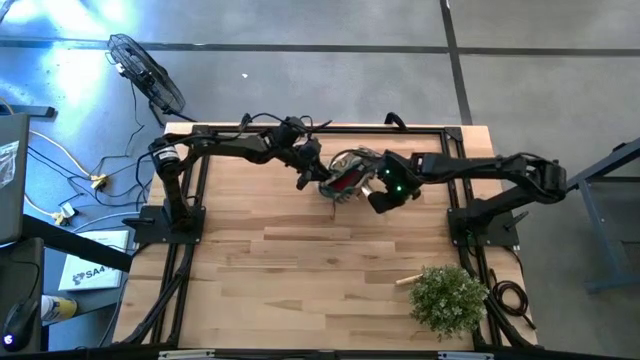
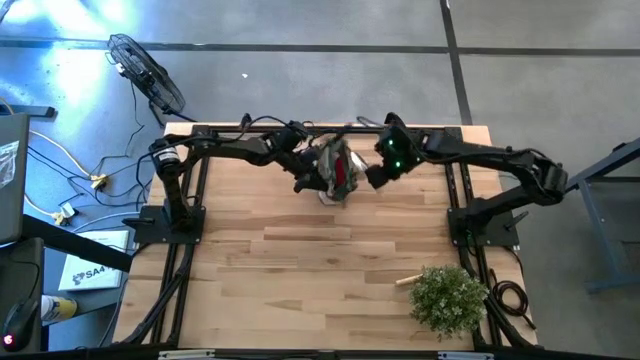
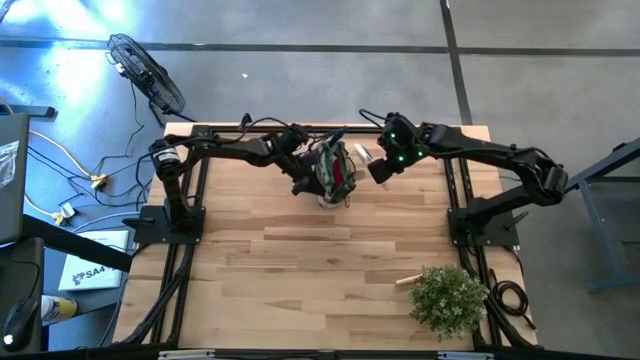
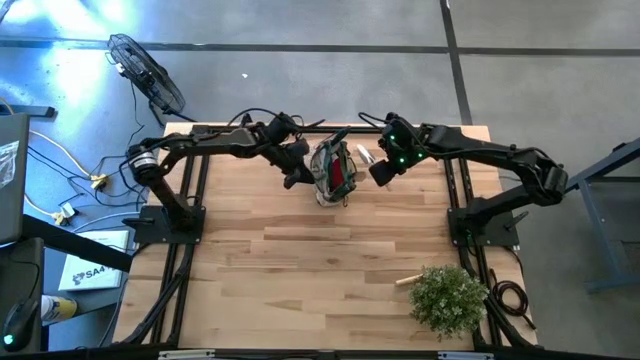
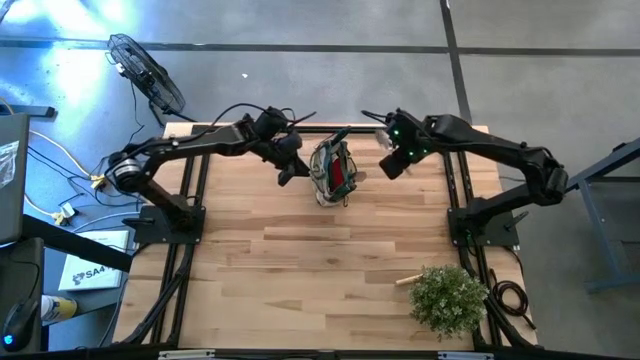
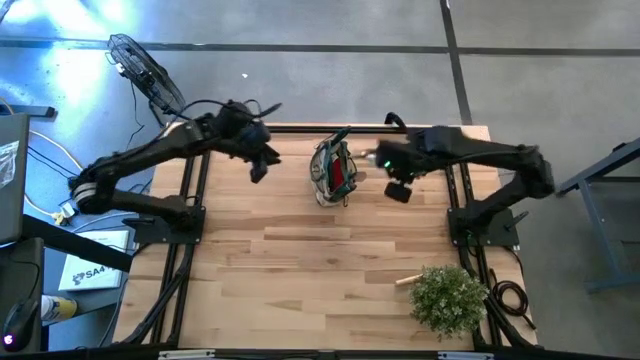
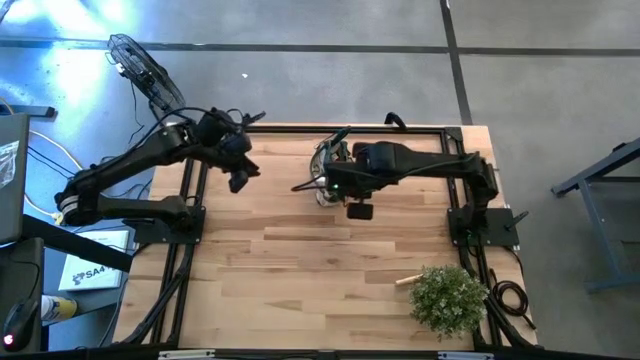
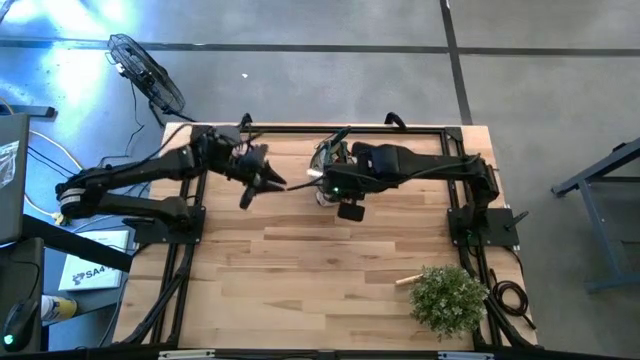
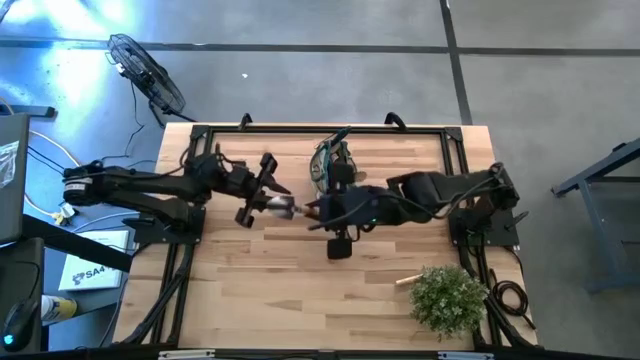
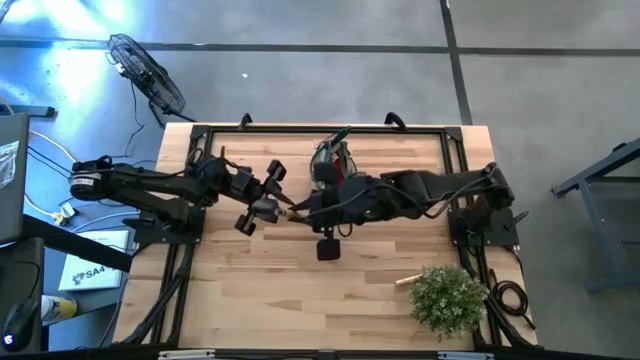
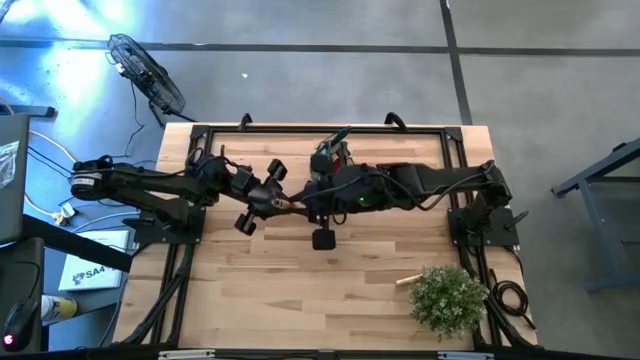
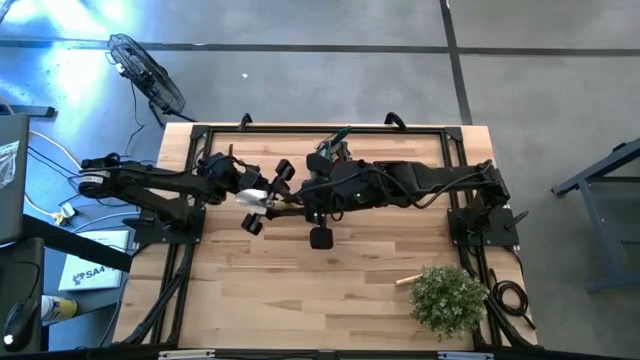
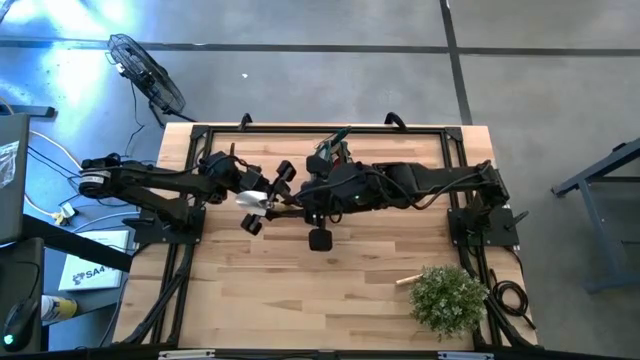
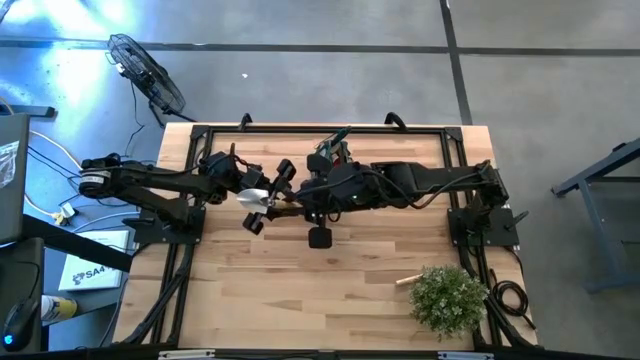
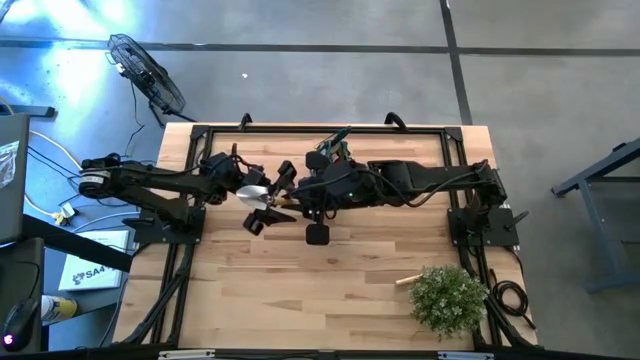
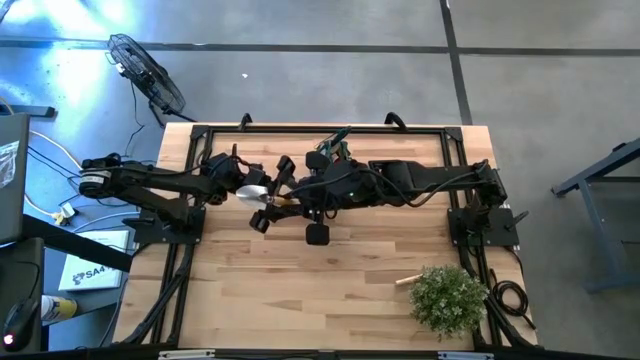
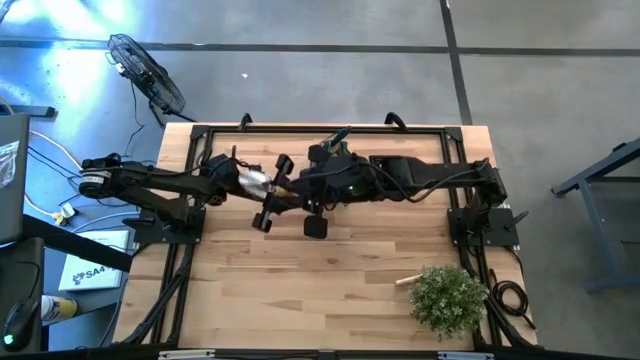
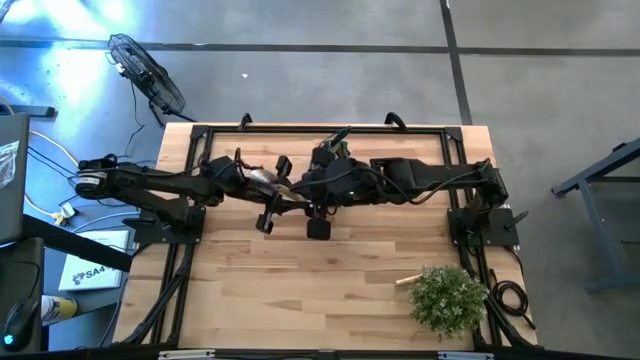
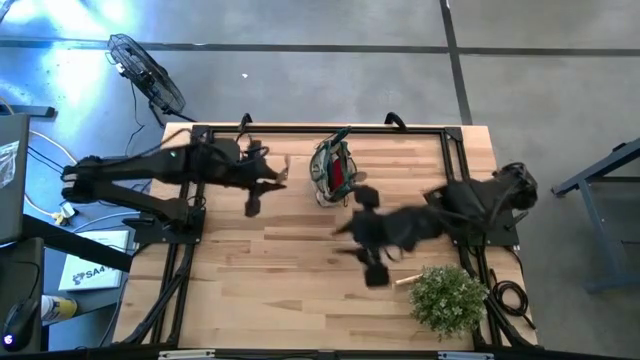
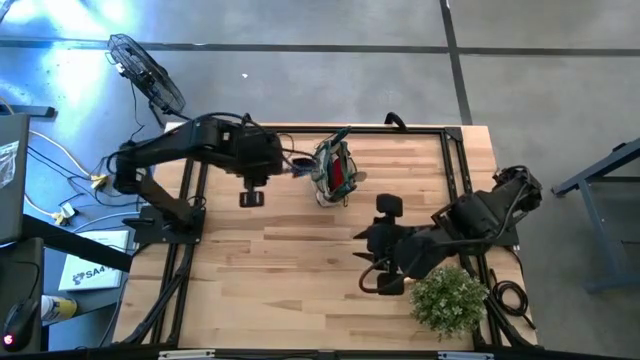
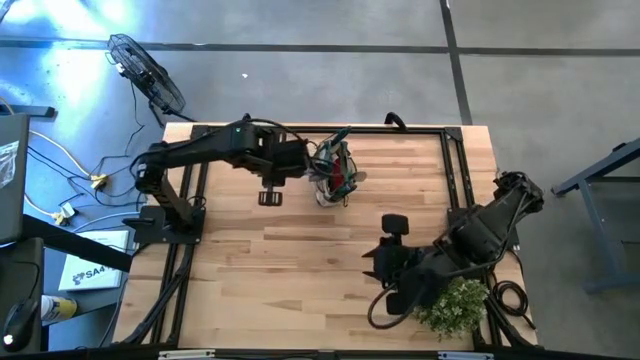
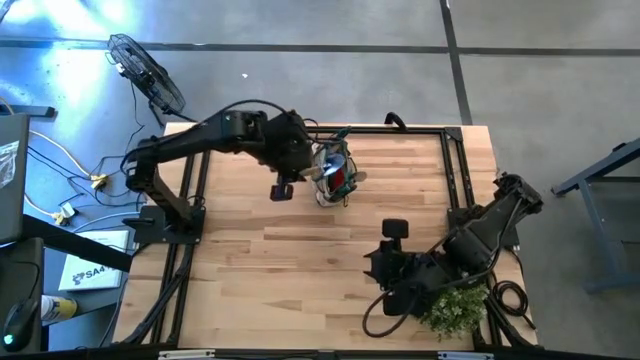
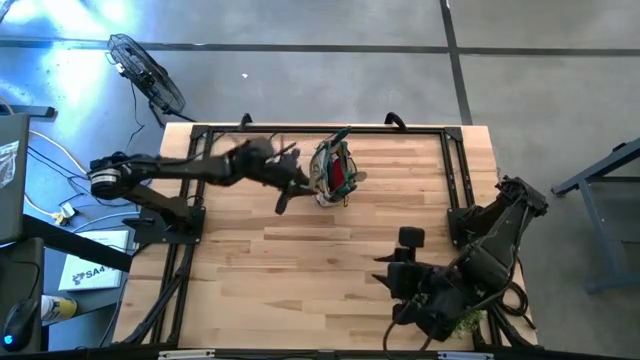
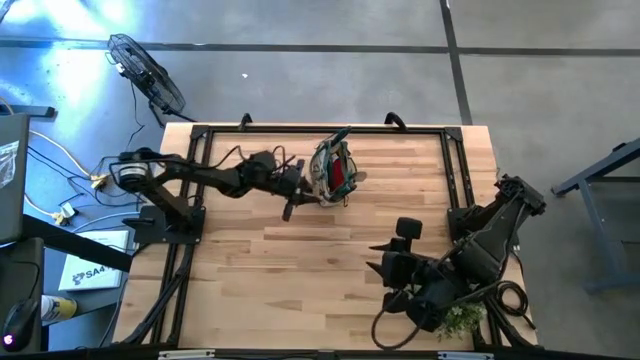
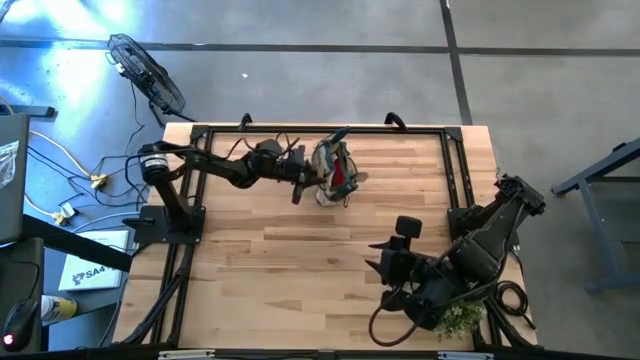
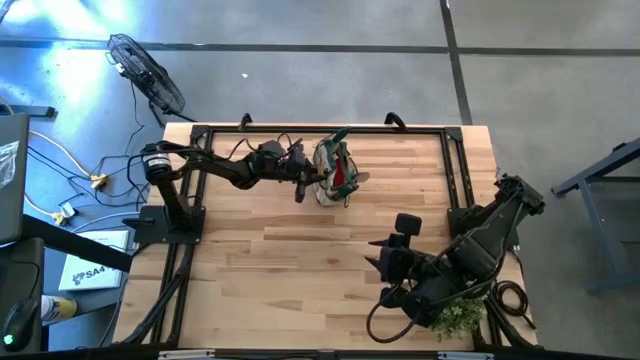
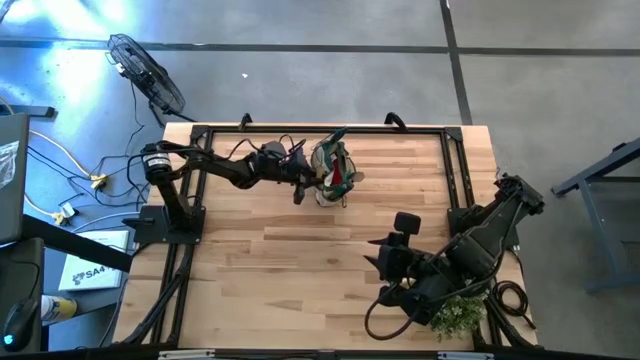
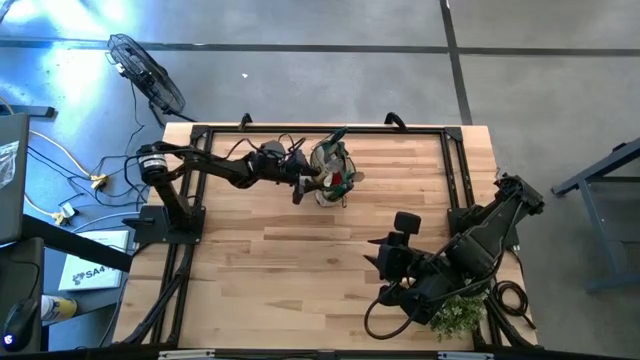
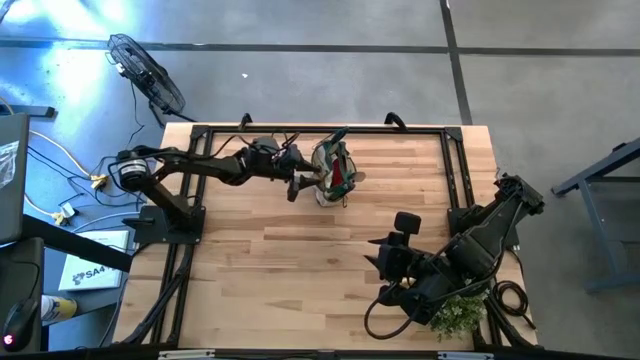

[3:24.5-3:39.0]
Task: Pick & Place Garden tools in Gardening bag
Put the top brown trowel into the light brown gardening bag

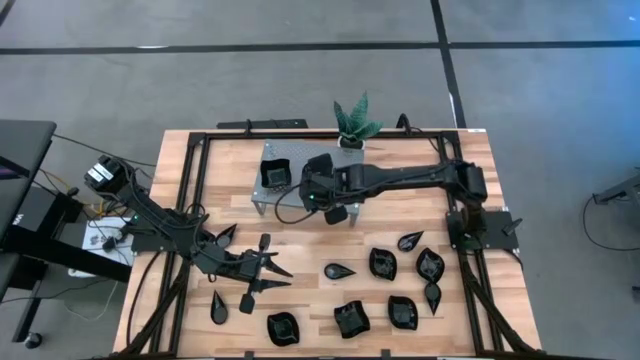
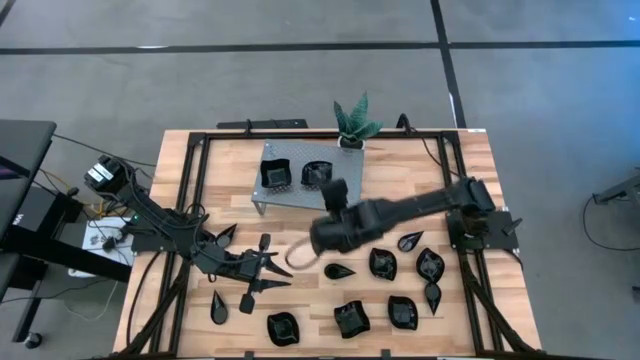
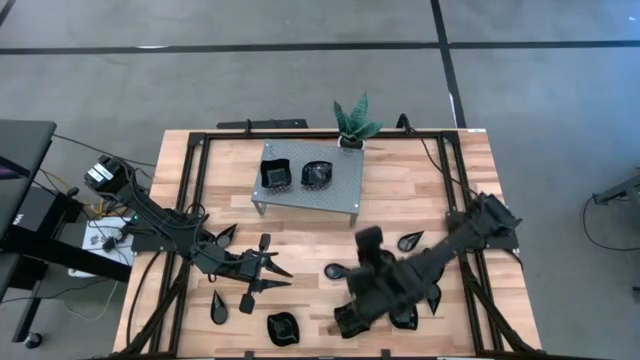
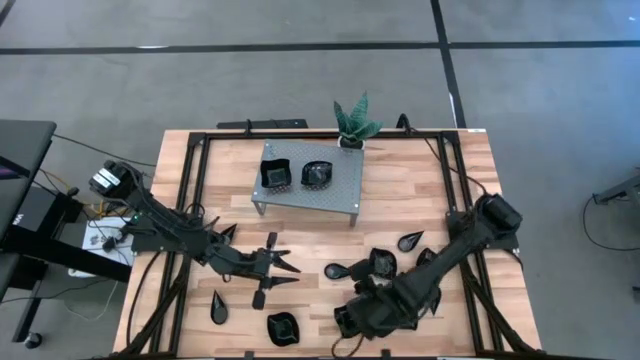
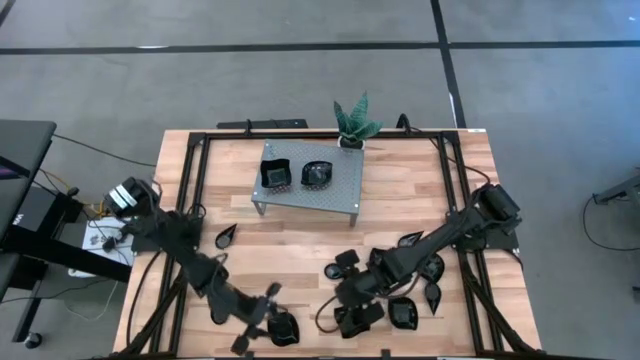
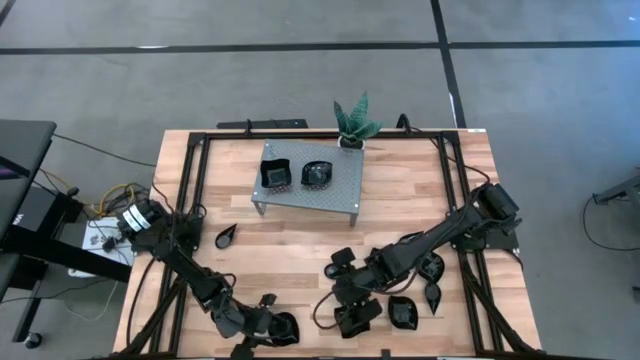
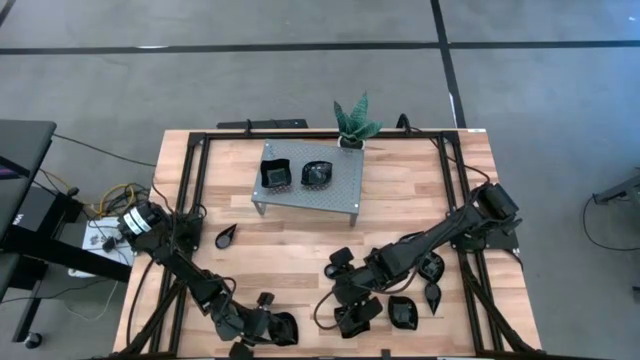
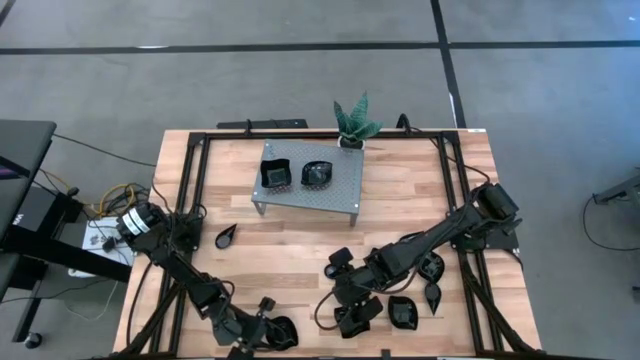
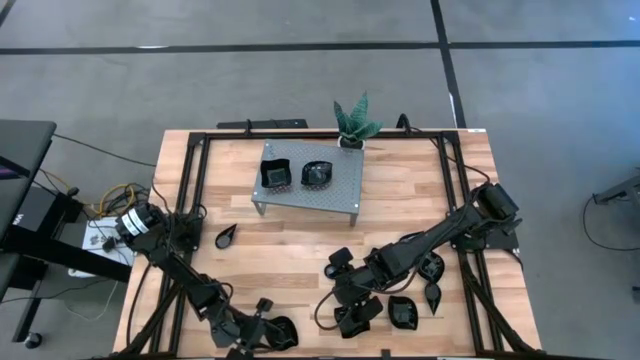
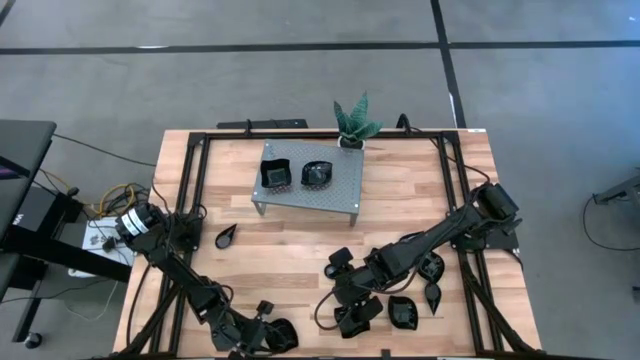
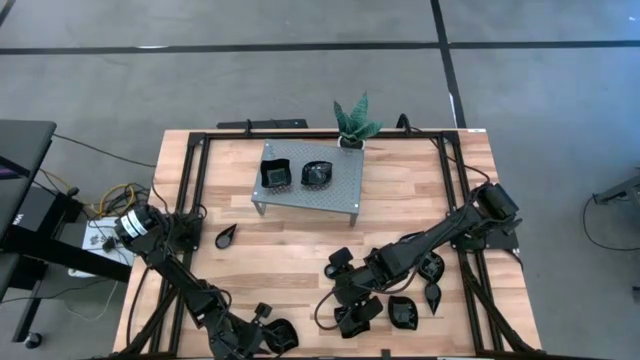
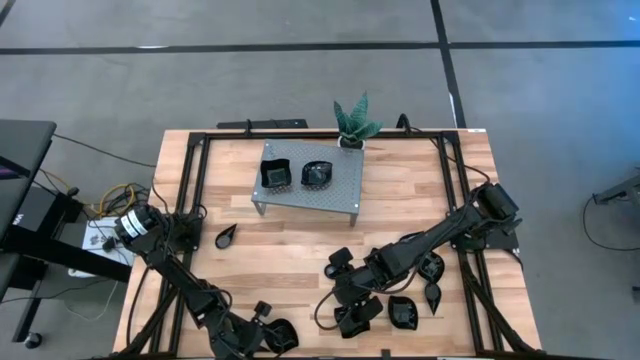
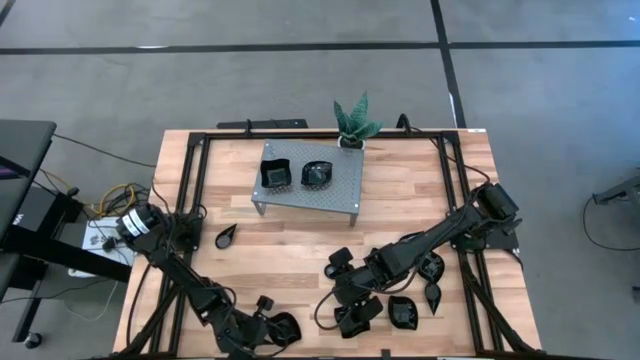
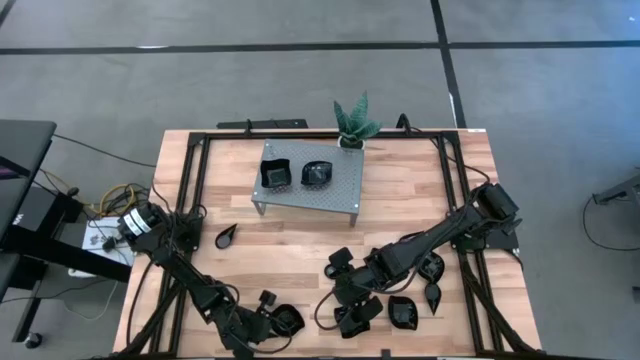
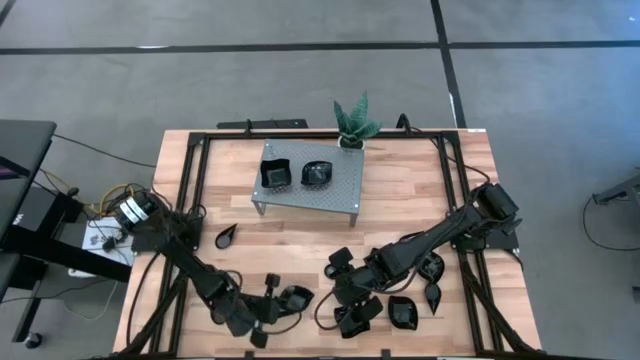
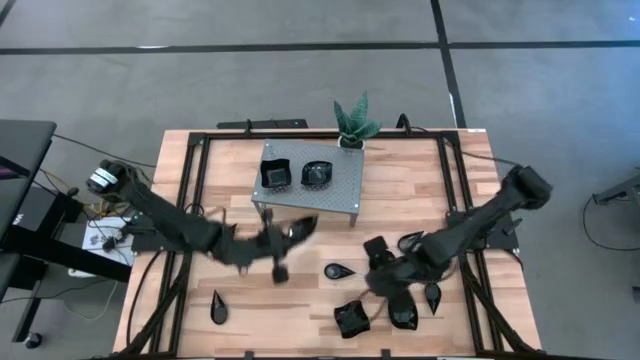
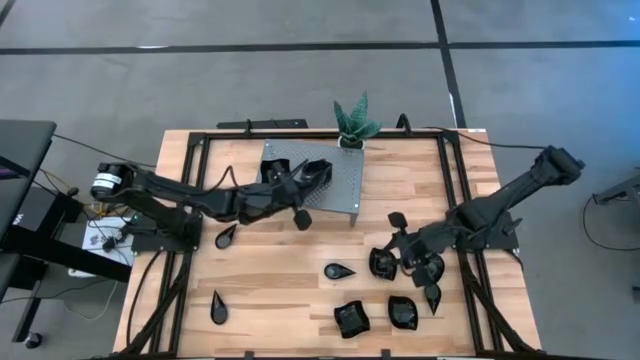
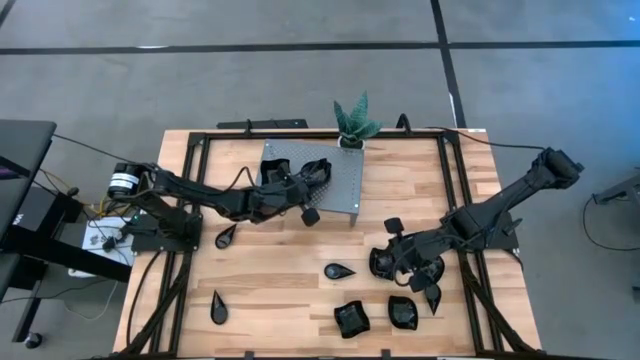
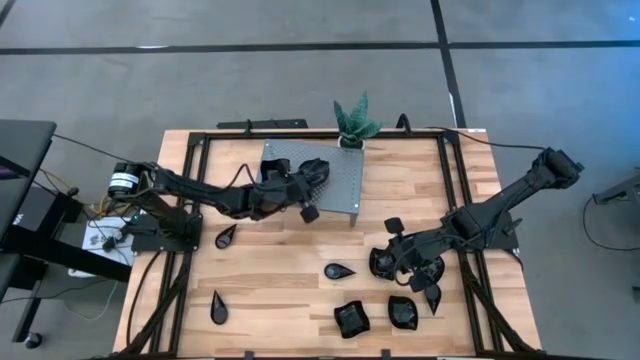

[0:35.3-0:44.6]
Task: Pick & Place Mini shaped plates
Stack the black leaf shaped plate on top of the black leaf shaped plate on the shelf
